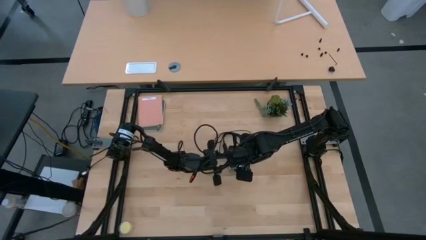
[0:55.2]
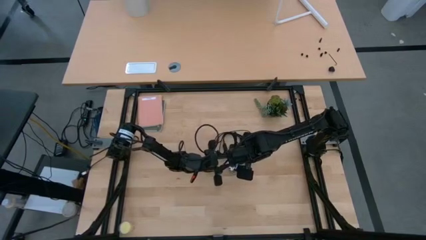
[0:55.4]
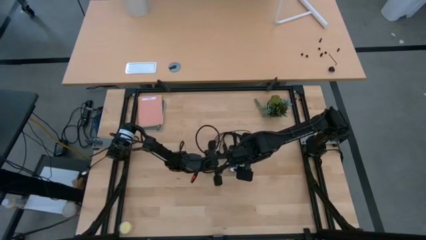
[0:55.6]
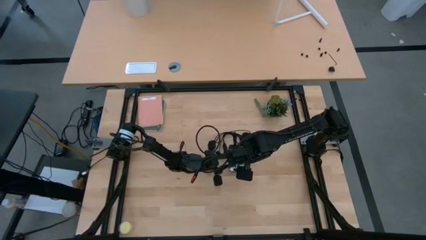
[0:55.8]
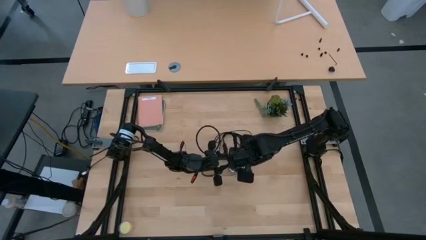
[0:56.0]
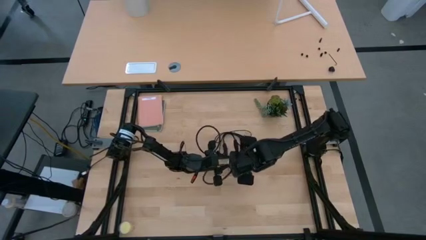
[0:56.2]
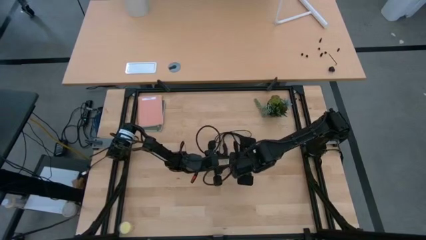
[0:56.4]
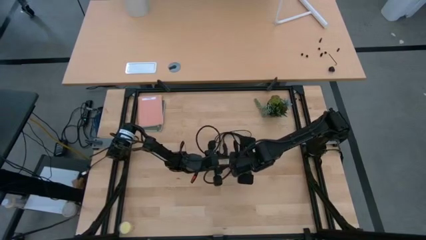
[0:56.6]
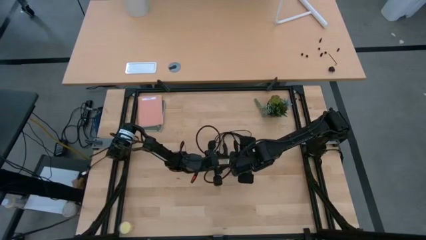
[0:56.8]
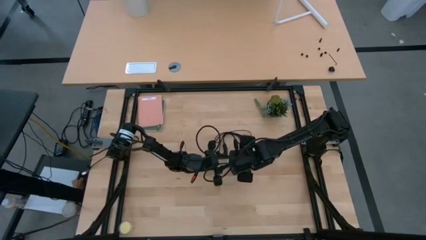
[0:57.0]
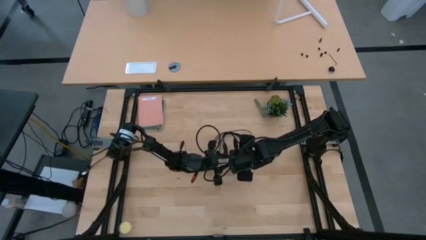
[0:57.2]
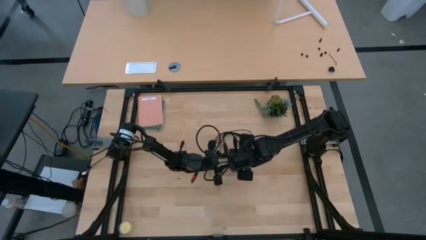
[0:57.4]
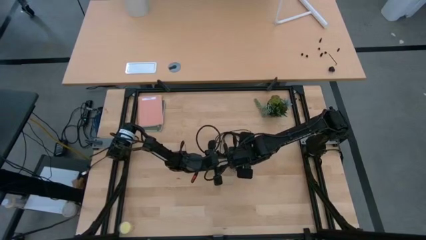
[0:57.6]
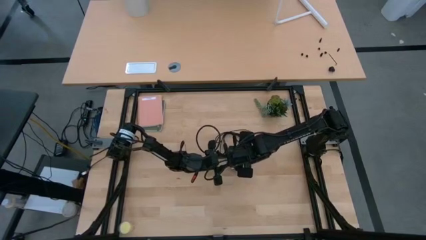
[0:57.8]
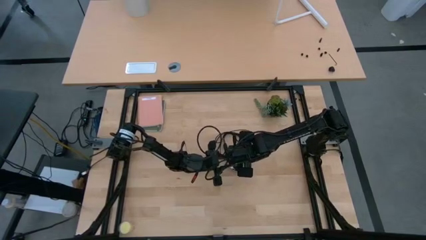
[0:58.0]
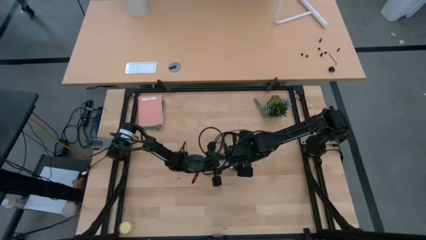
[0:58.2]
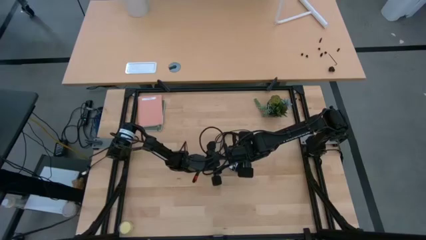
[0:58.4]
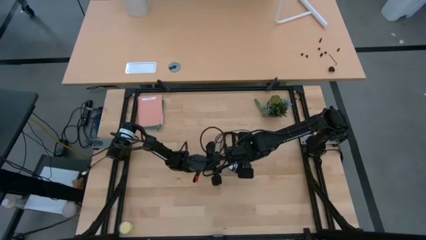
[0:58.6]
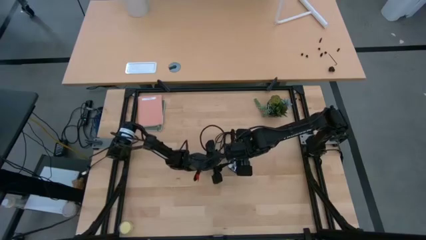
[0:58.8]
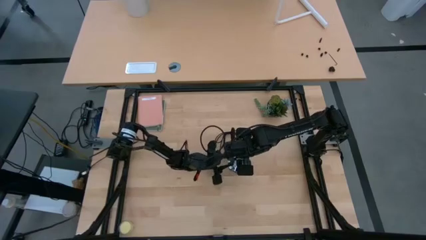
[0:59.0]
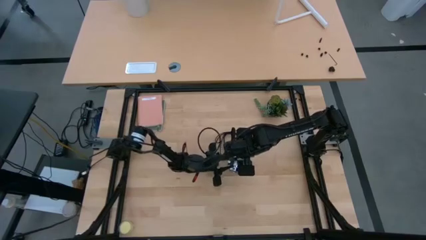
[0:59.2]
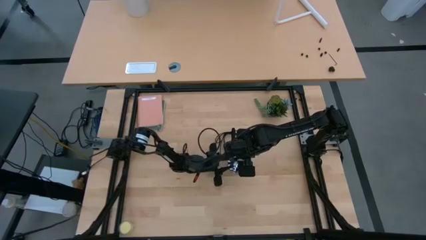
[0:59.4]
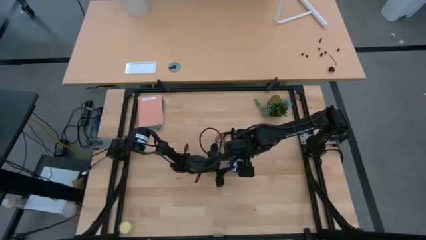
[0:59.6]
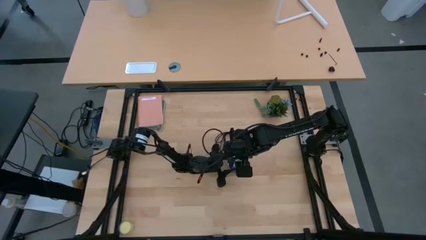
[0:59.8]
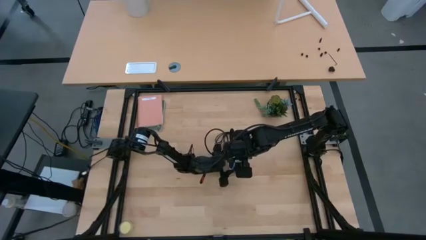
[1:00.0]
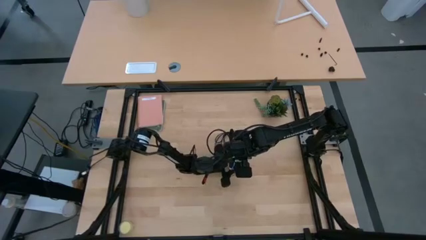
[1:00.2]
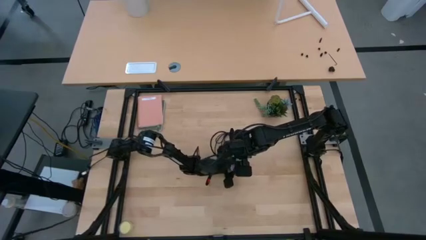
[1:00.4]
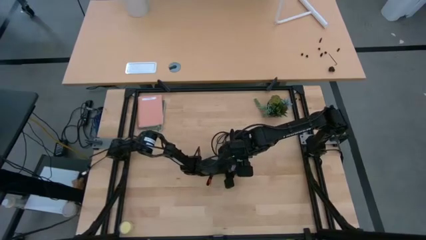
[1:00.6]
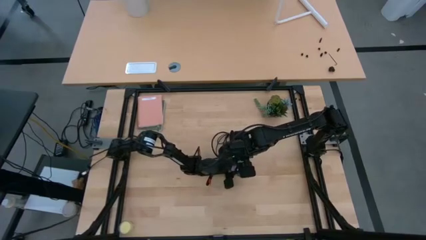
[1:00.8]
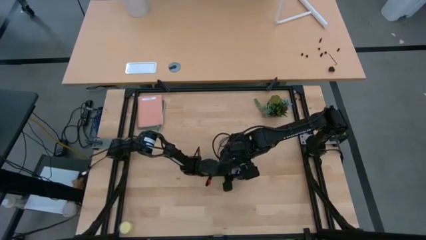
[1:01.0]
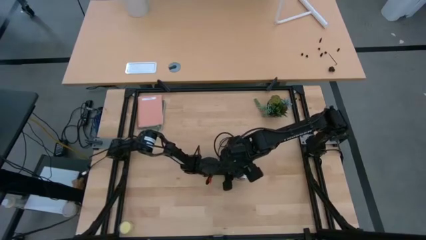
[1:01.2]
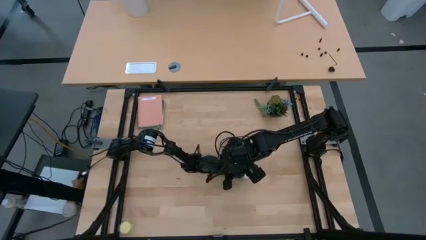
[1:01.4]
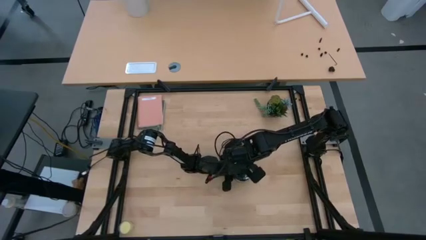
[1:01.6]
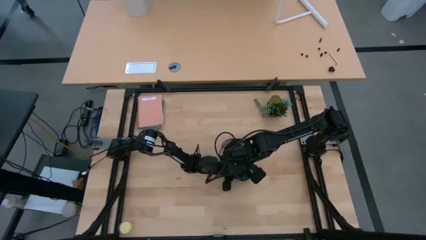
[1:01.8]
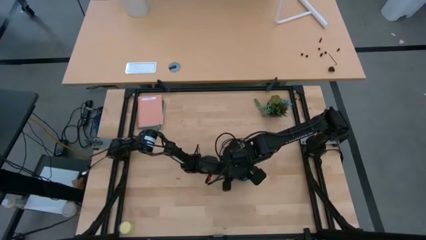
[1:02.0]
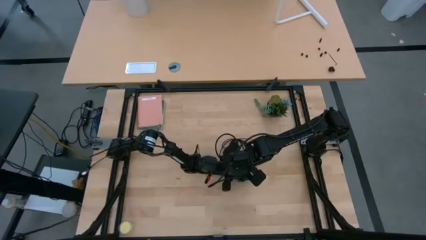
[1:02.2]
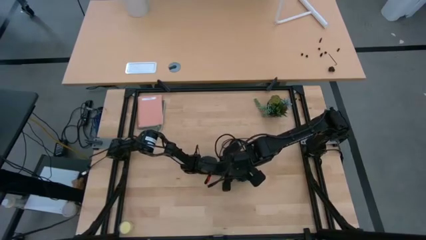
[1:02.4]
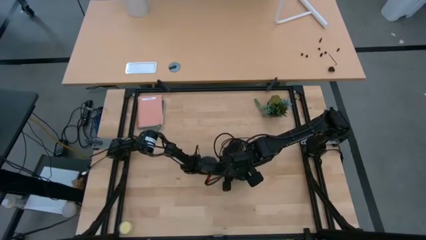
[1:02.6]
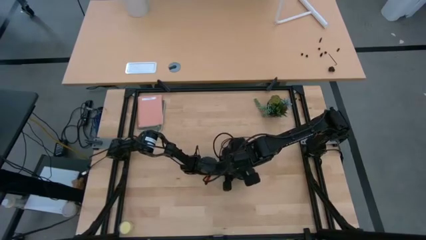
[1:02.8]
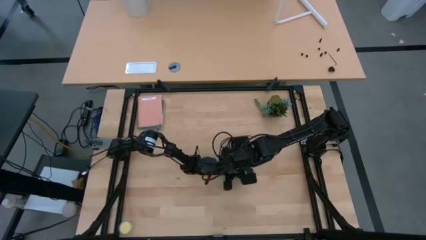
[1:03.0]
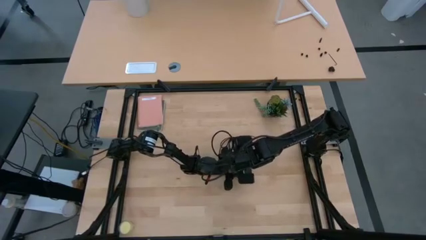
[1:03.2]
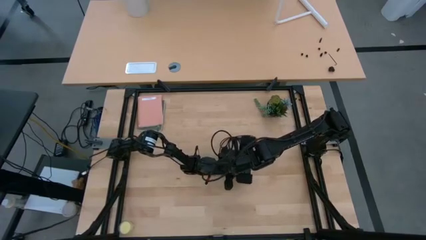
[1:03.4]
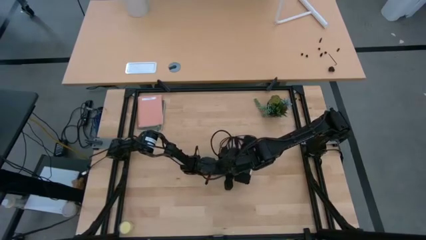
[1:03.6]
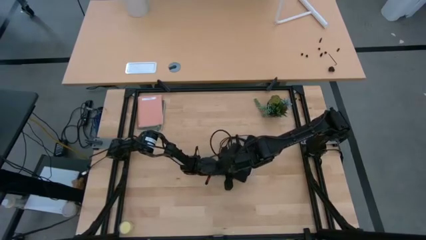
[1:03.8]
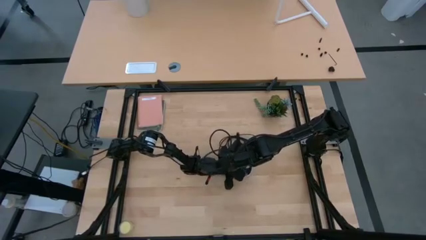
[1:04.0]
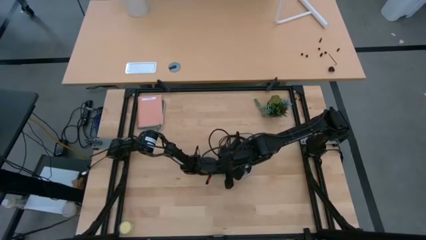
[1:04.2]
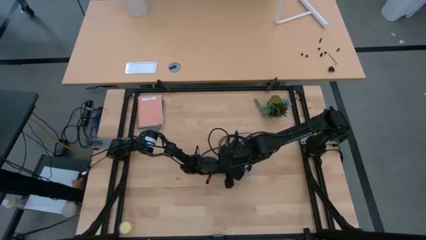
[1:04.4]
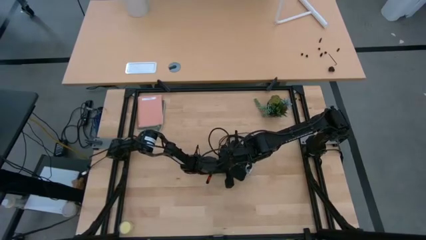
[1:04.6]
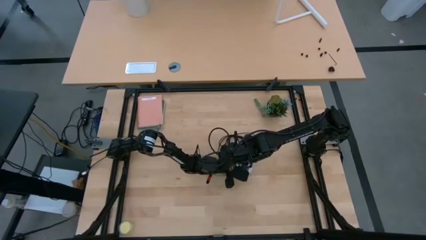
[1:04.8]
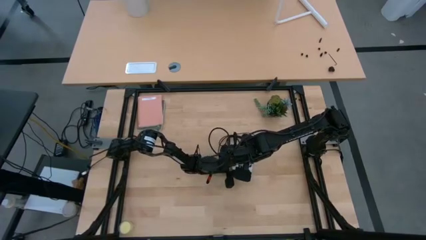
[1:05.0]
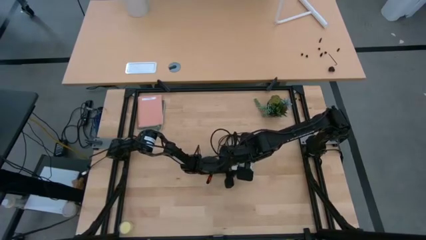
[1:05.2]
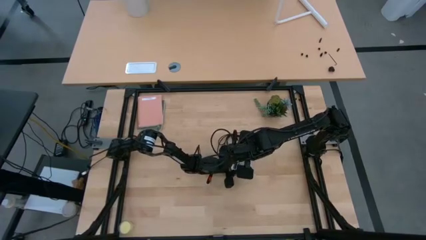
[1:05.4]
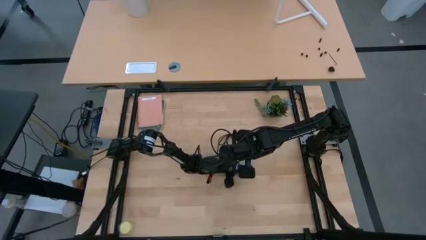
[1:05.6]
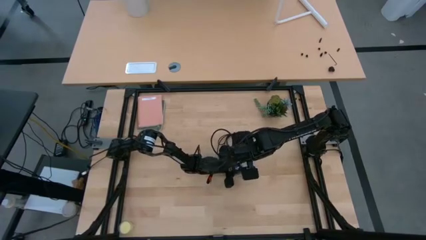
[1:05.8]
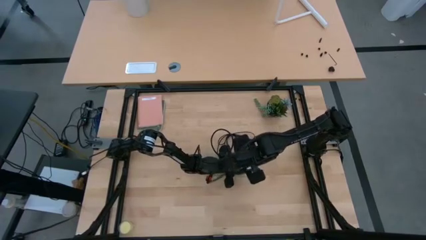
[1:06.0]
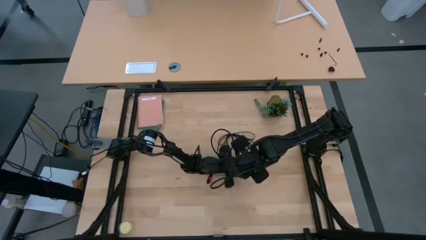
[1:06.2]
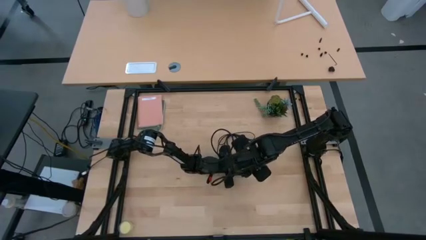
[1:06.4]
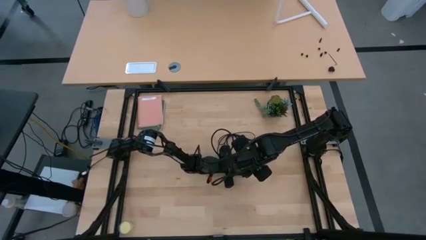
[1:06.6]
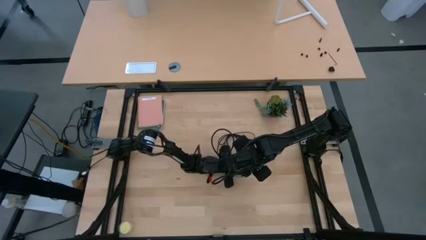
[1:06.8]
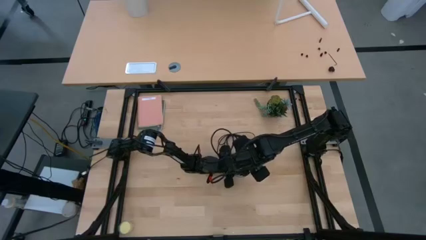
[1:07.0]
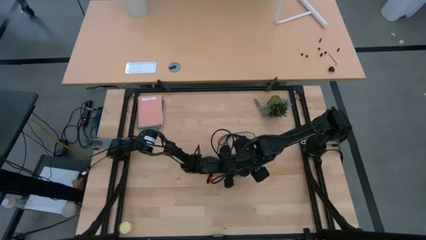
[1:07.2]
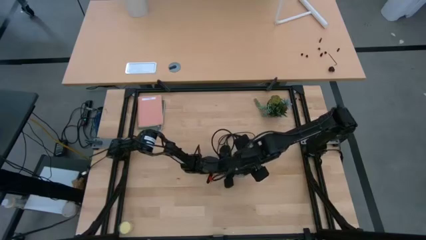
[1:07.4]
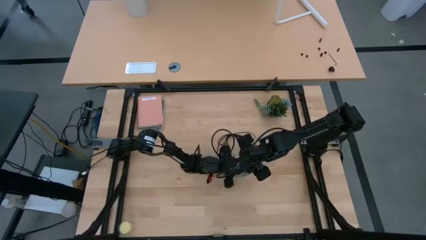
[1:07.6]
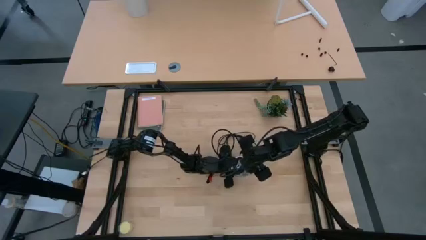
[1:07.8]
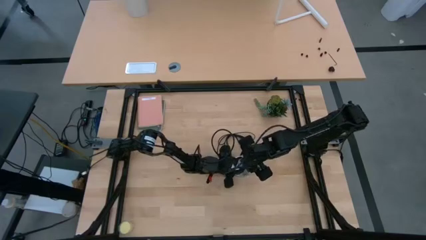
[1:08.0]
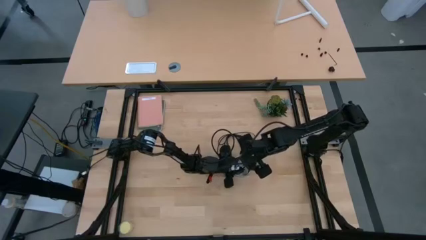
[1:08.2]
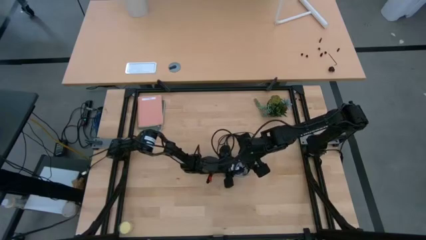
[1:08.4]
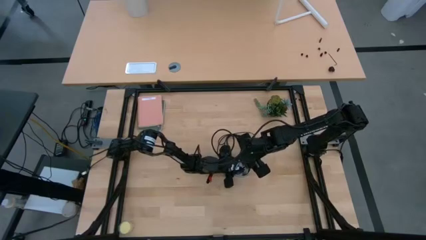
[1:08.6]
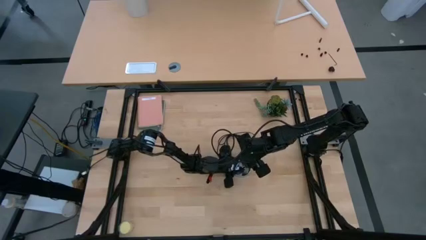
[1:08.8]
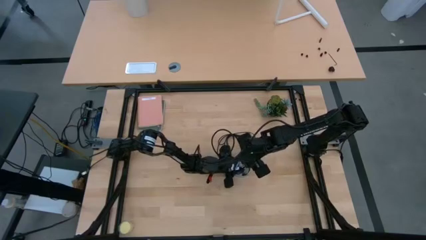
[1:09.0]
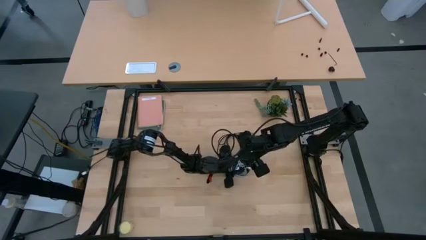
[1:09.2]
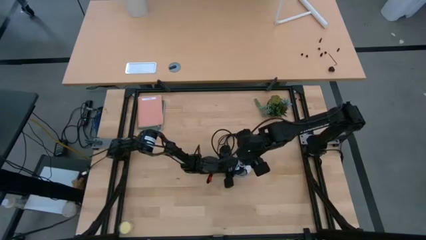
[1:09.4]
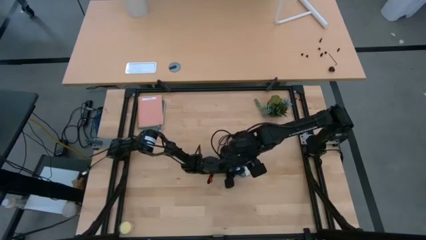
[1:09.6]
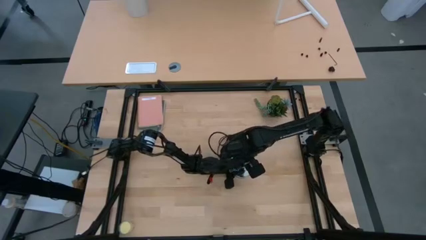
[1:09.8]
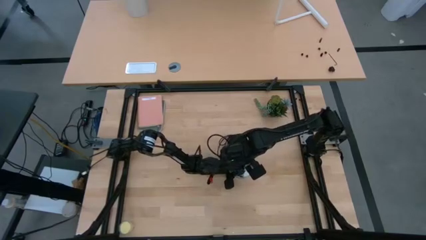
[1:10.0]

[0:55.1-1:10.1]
Task: Screw lightbulb
Insert the white lightbulb into the silver lamp
